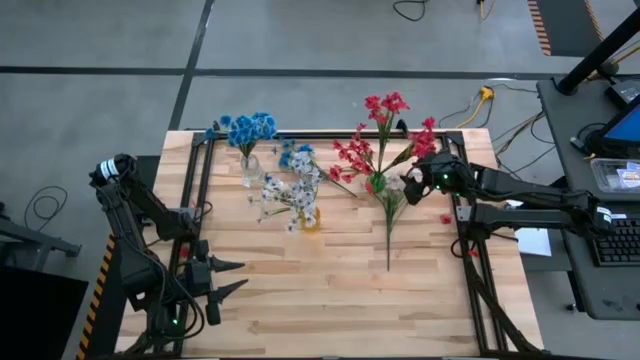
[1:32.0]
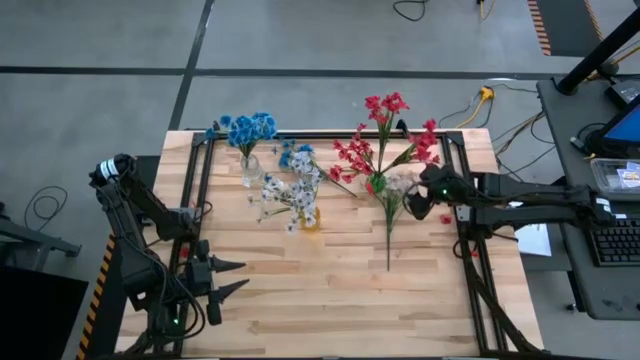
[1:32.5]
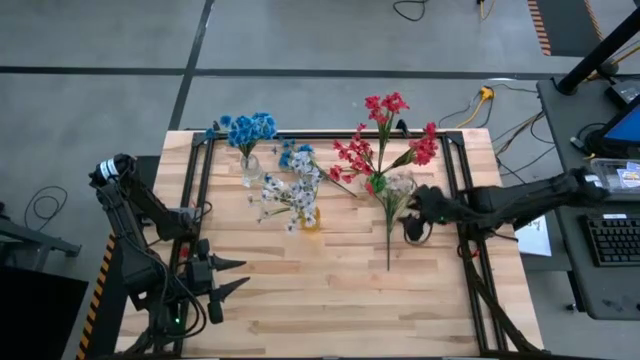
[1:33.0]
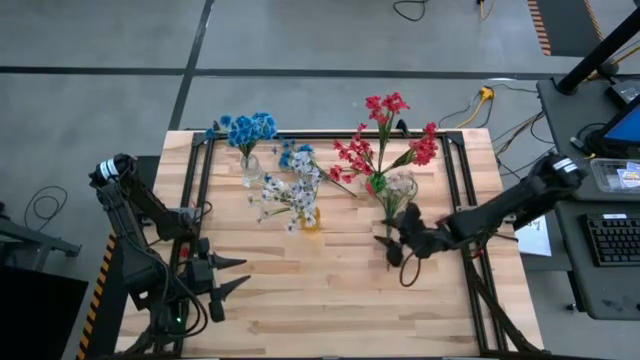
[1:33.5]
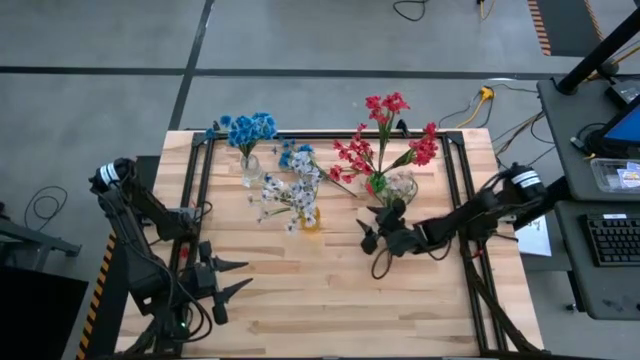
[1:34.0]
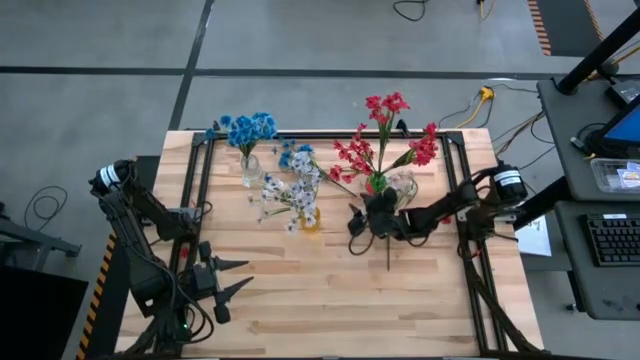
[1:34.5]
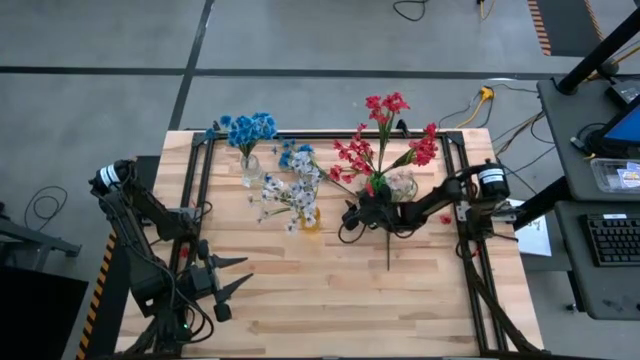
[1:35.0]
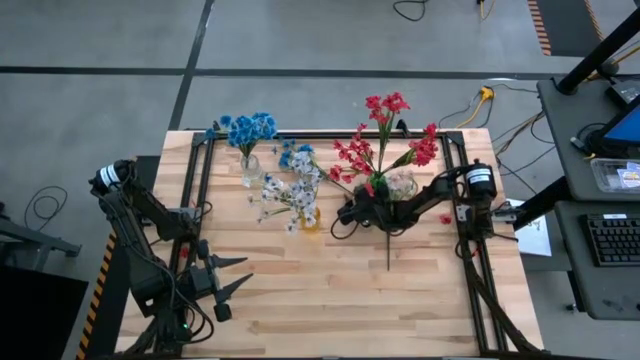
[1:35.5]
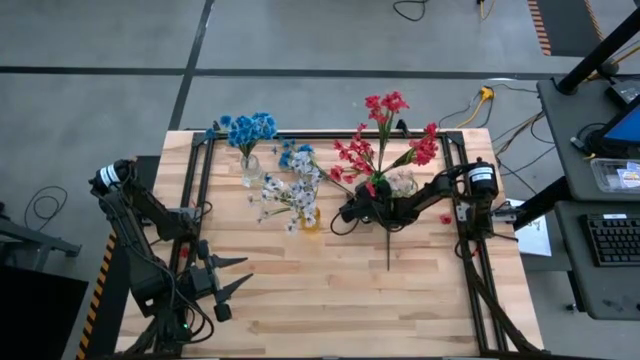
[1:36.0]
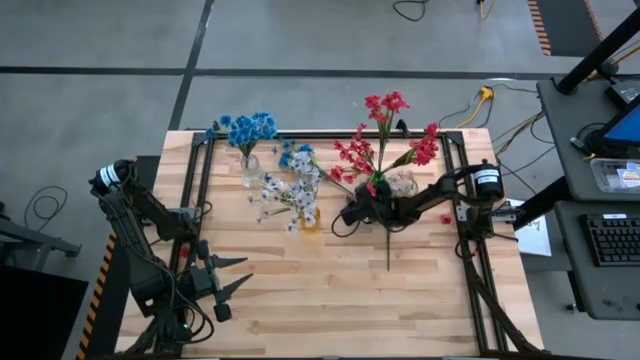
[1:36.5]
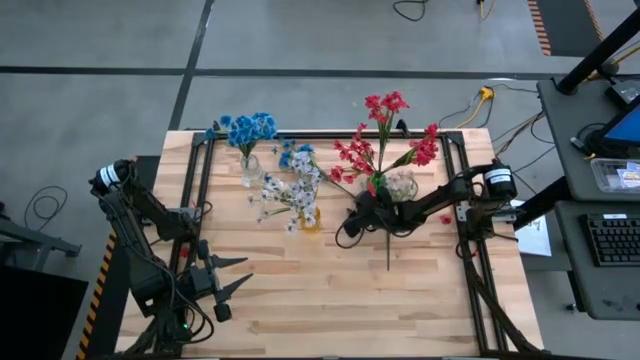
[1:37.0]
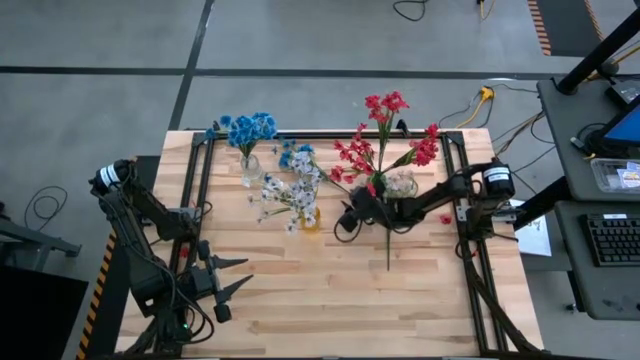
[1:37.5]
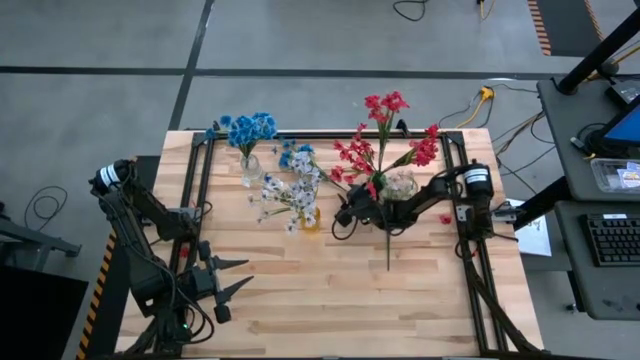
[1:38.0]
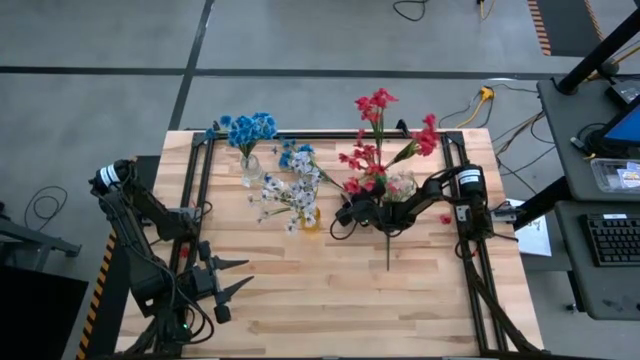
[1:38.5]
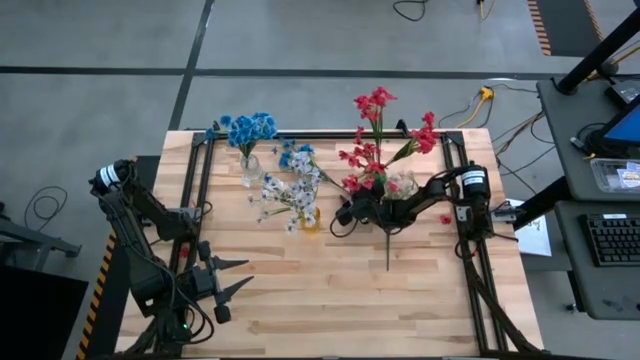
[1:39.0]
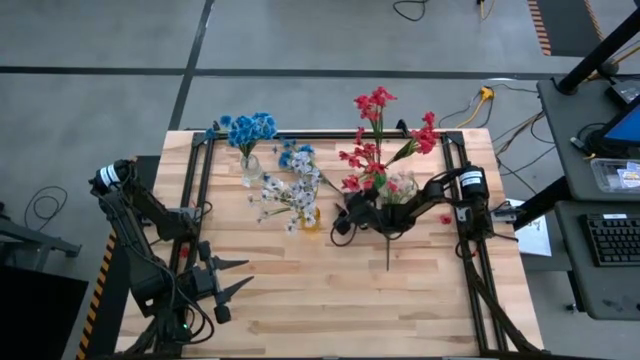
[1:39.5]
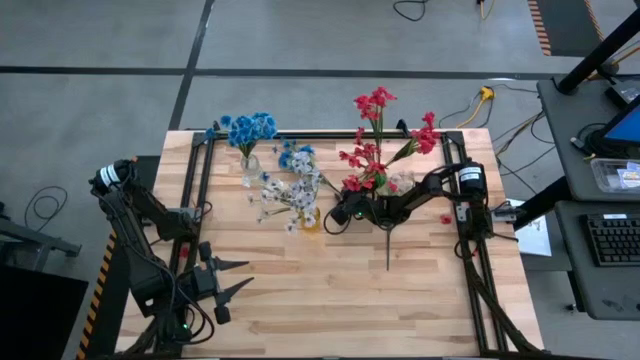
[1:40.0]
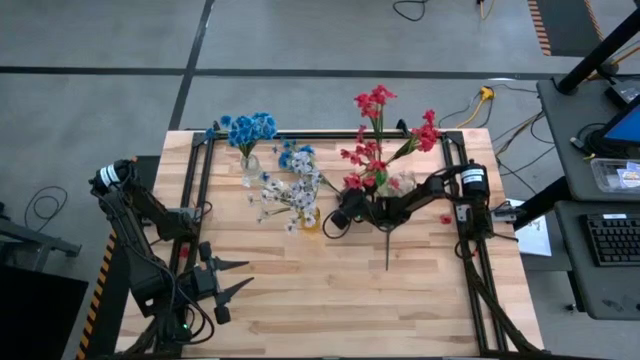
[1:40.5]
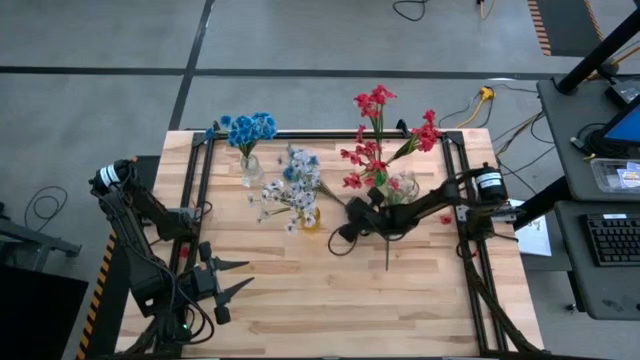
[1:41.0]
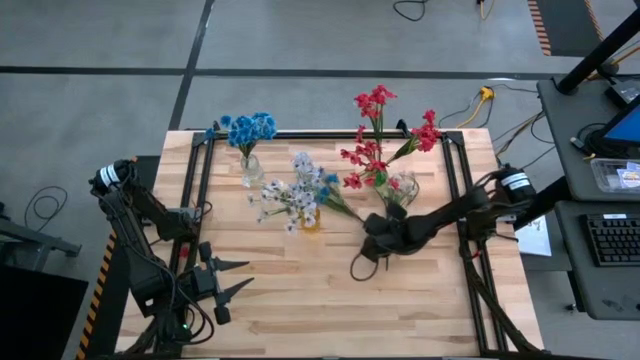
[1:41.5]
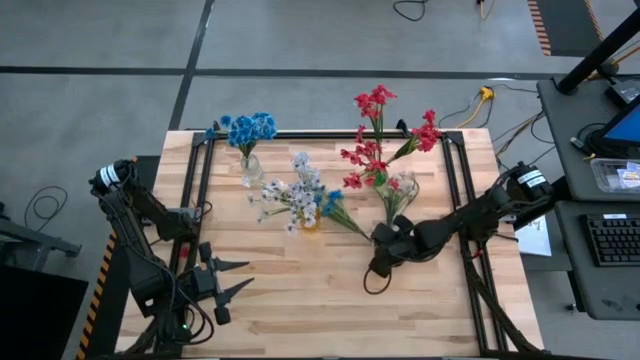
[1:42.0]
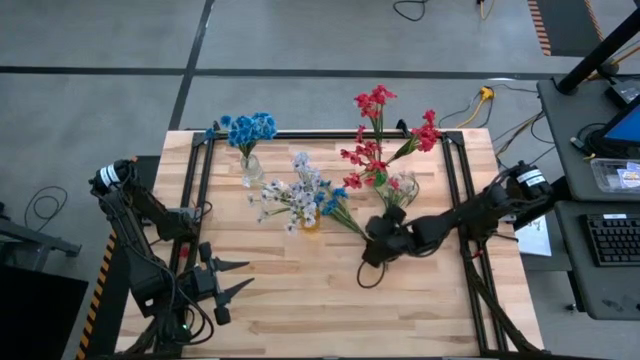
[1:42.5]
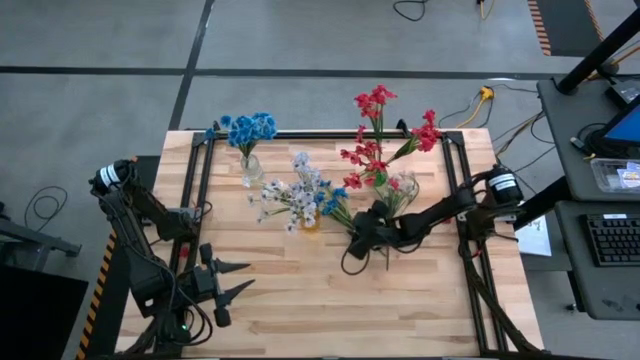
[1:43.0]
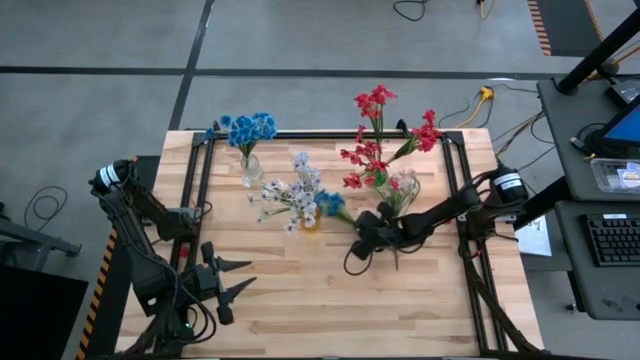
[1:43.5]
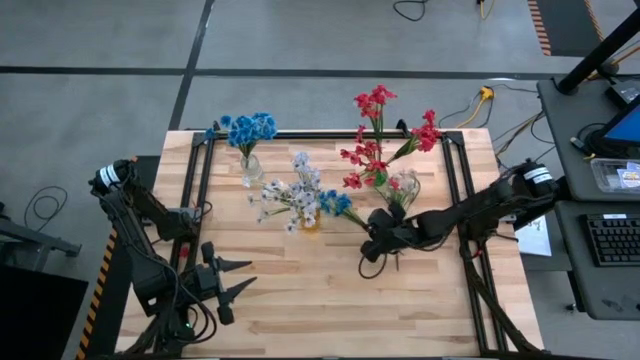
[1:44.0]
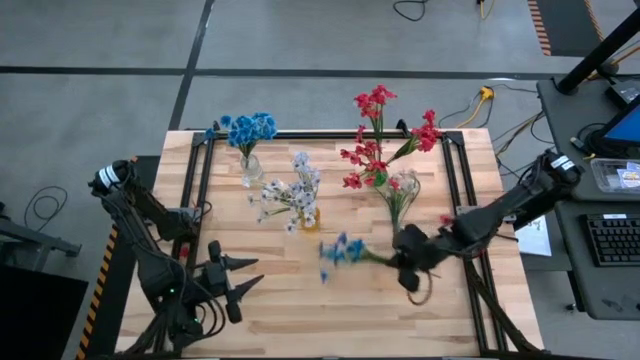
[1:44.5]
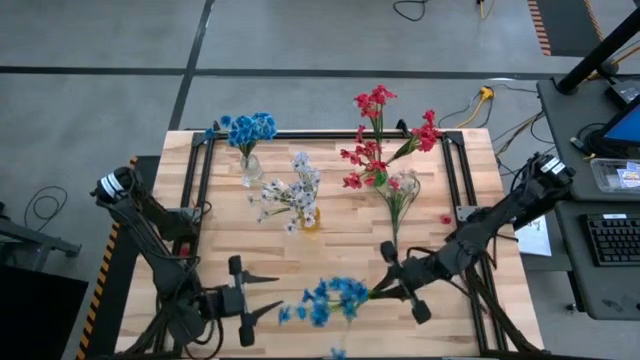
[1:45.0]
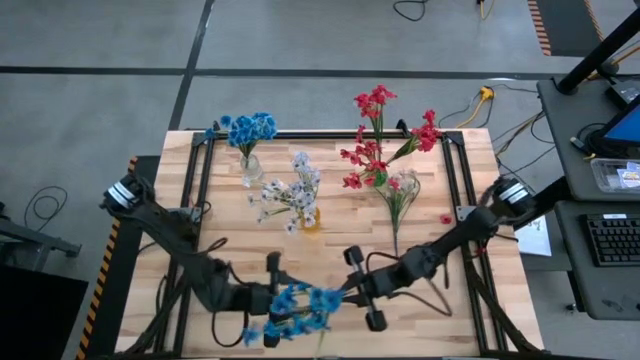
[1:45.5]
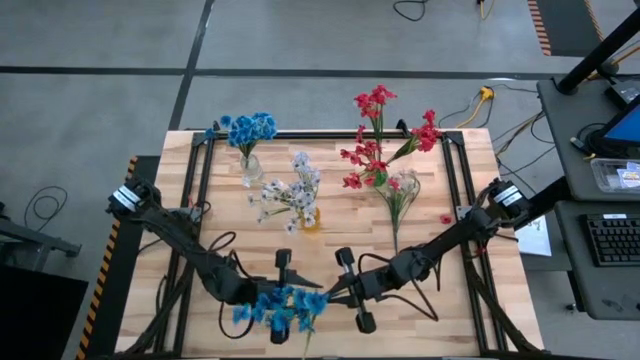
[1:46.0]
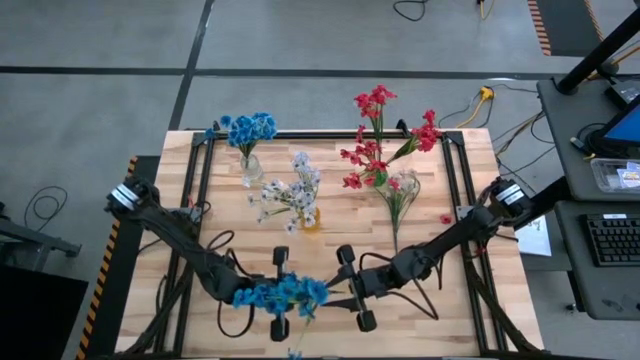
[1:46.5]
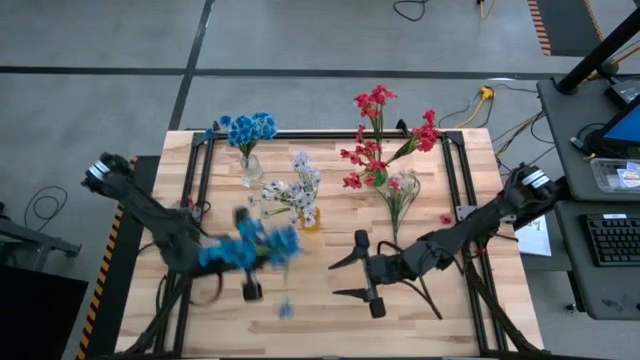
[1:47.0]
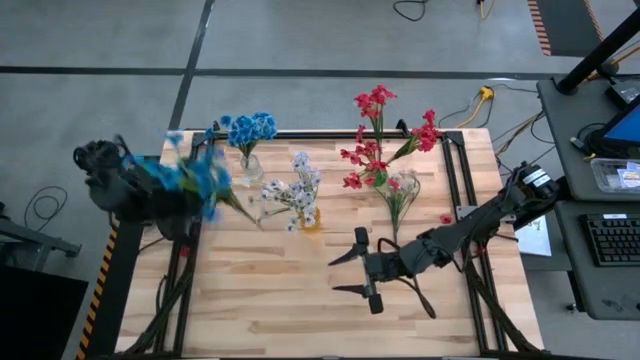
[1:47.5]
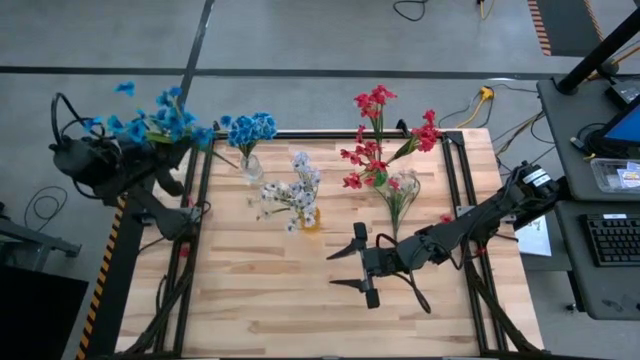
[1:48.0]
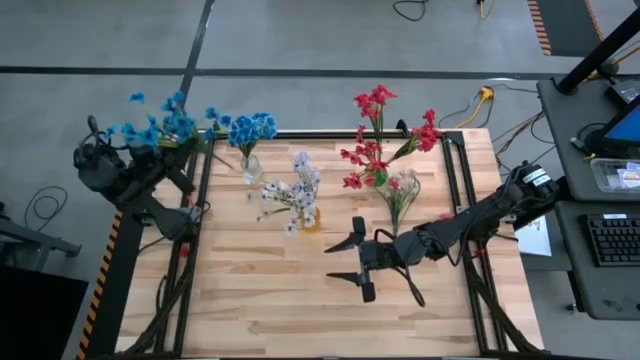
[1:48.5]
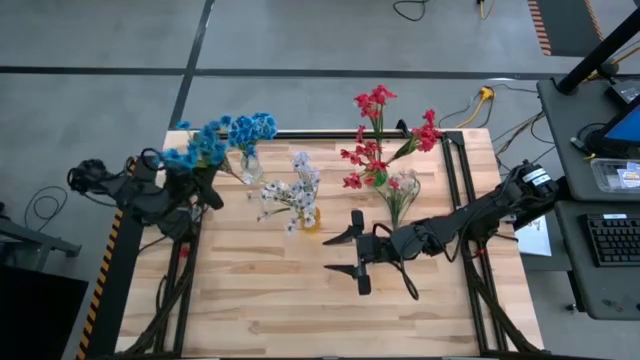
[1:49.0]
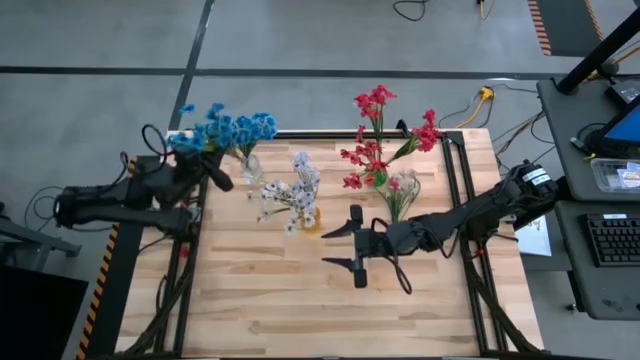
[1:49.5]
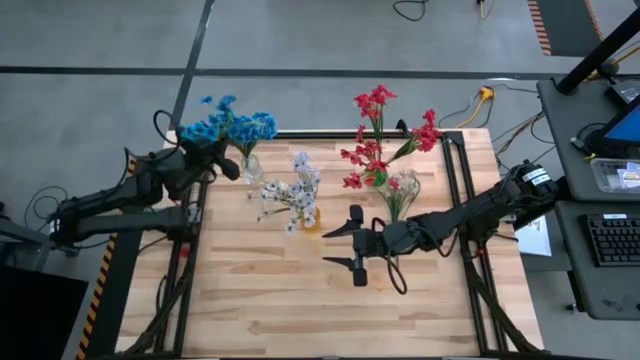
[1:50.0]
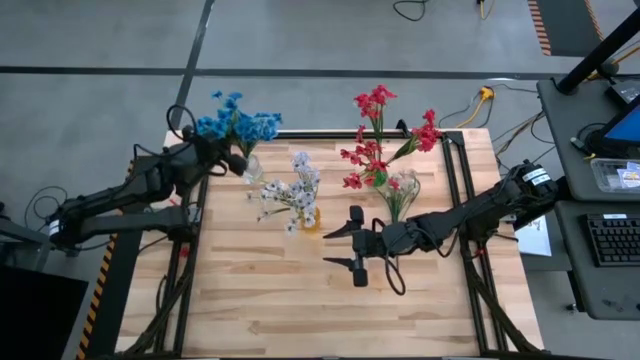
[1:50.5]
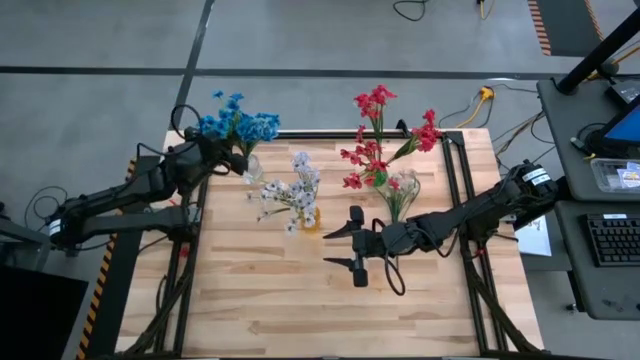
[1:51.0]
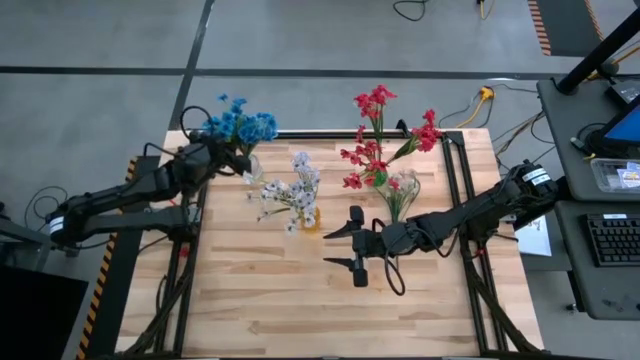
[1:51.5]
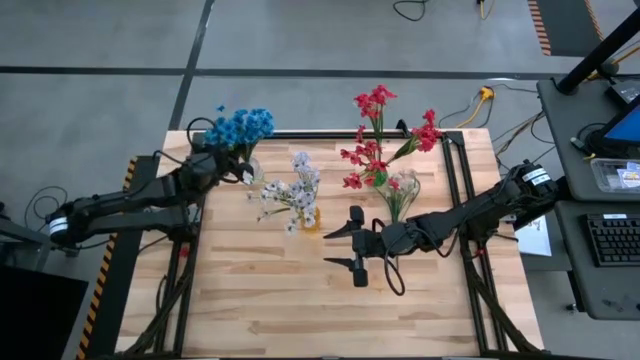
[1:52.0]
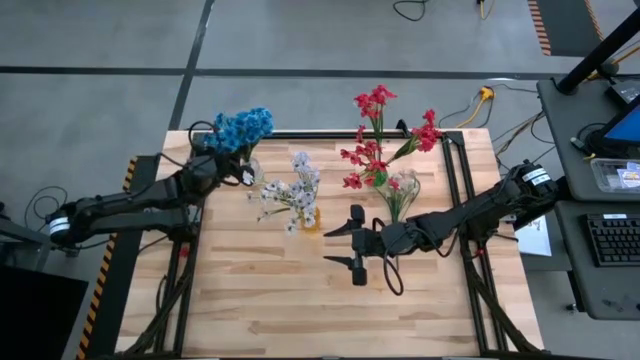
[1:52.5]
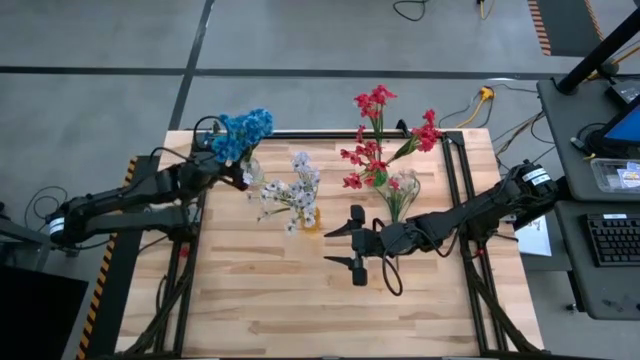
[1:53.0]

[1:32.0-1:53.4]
Task: Sort flowers into vase by color
Put the blue flowers into the transparent vase
